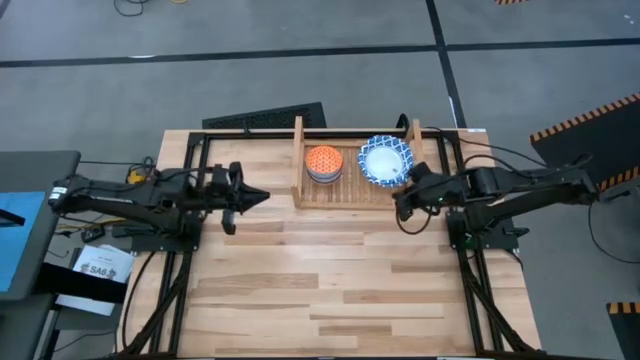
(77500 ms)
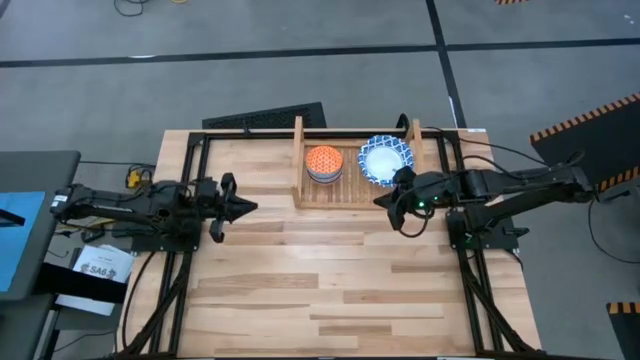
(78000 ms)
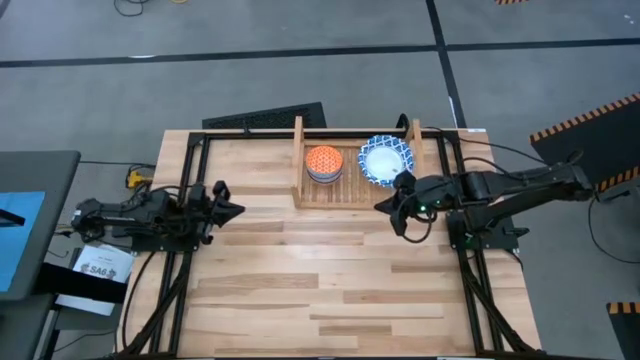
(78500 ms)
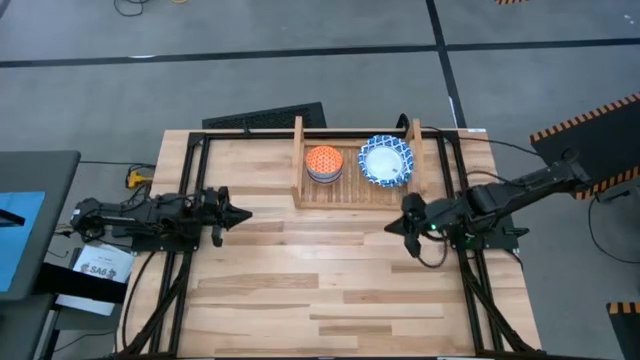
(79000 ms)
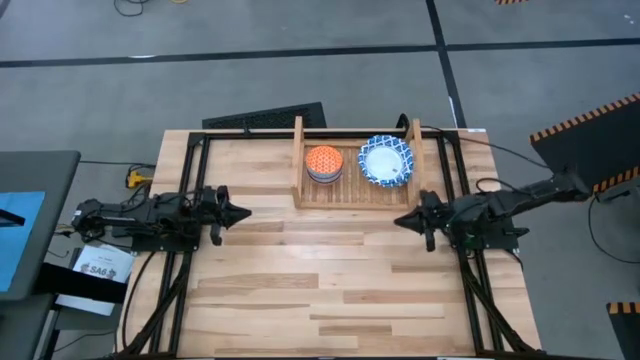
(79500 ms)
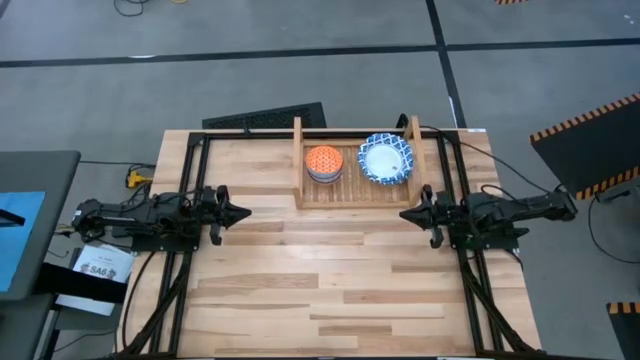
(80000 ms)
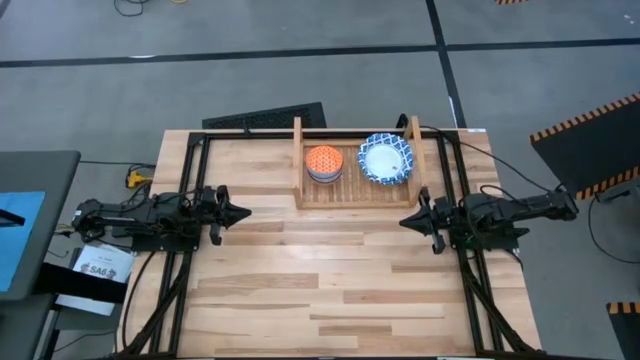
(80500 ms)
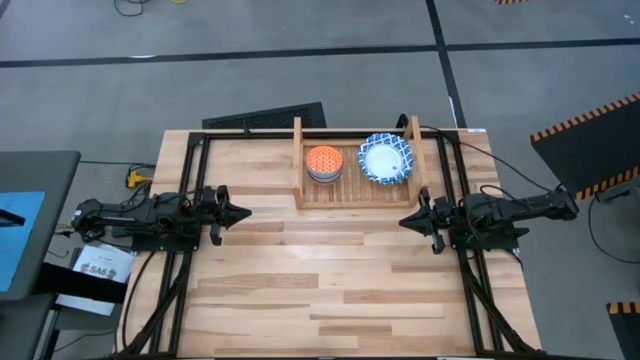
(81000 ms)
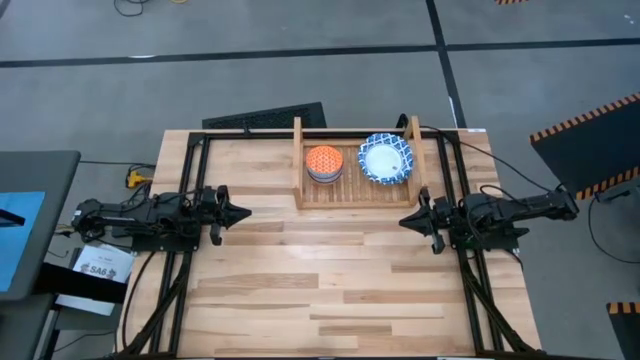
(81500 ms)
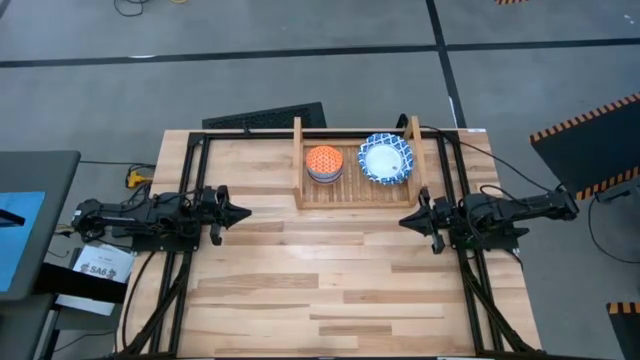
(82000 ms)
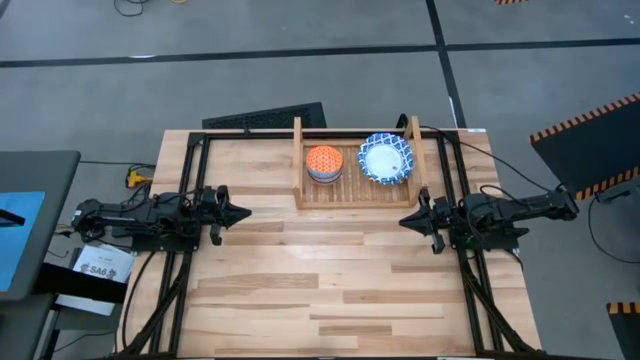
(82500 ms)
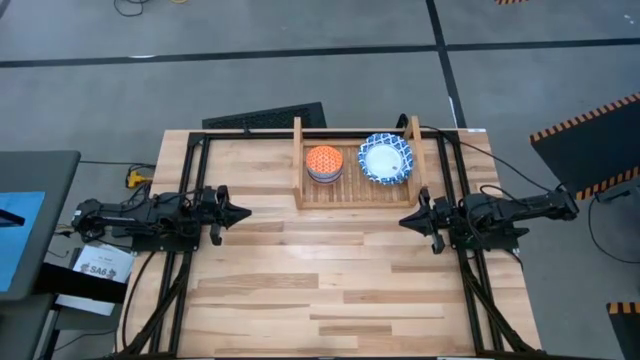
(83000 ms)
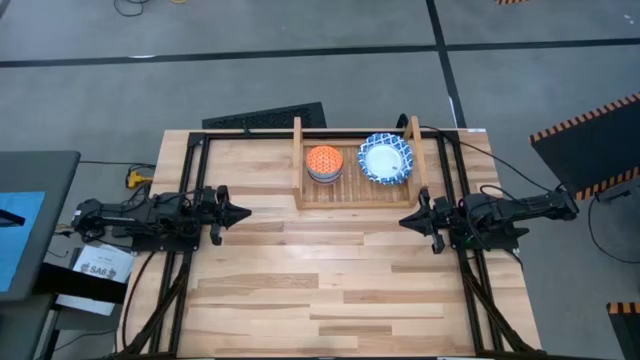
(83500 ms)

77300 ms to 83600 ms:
Task: Place and stack bowls onto a shelf
Return to Home Position

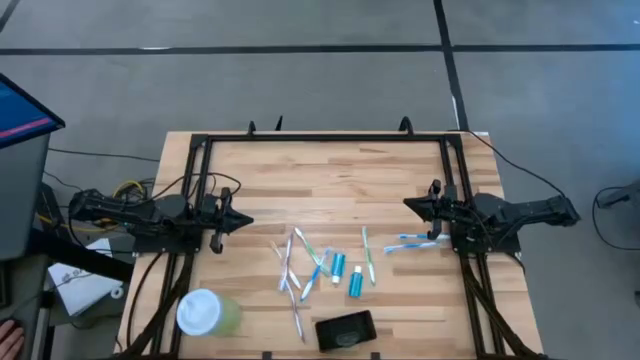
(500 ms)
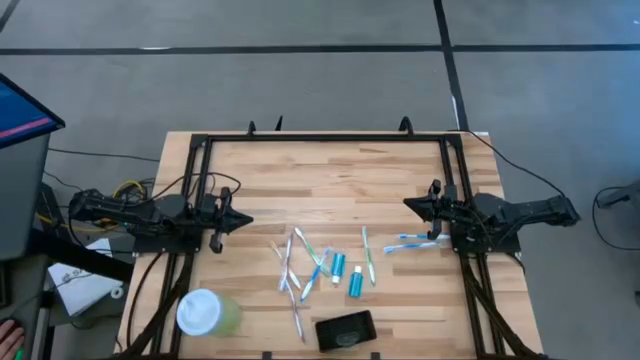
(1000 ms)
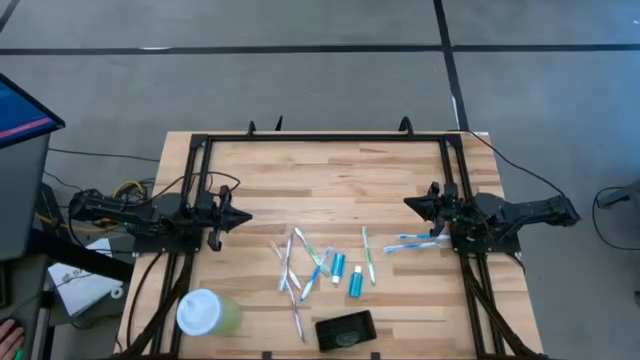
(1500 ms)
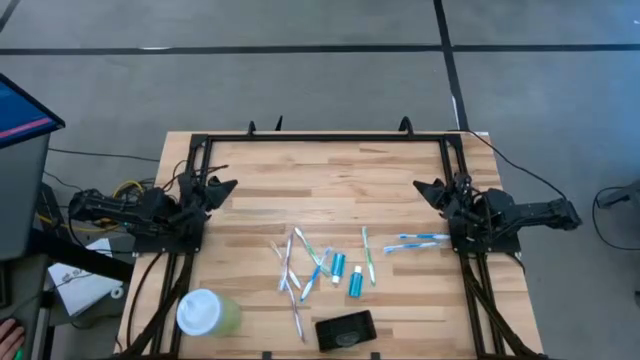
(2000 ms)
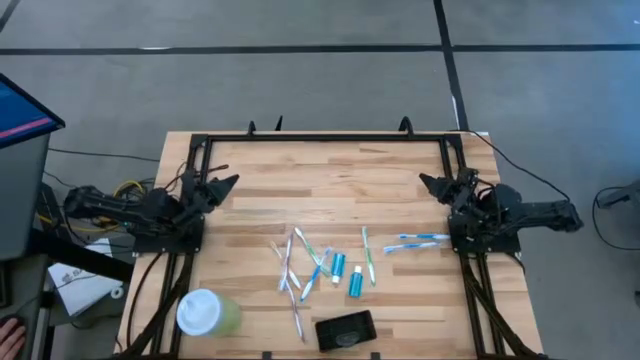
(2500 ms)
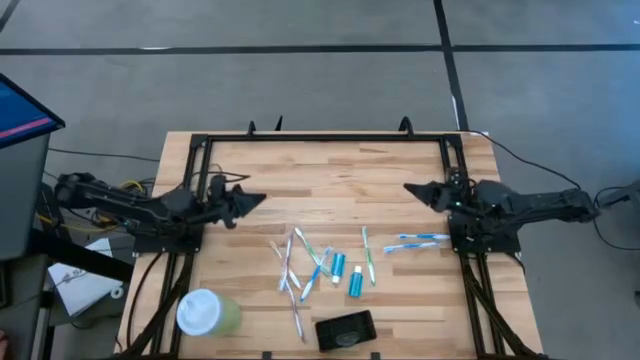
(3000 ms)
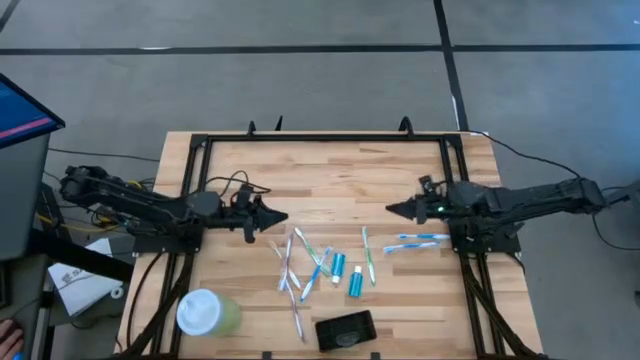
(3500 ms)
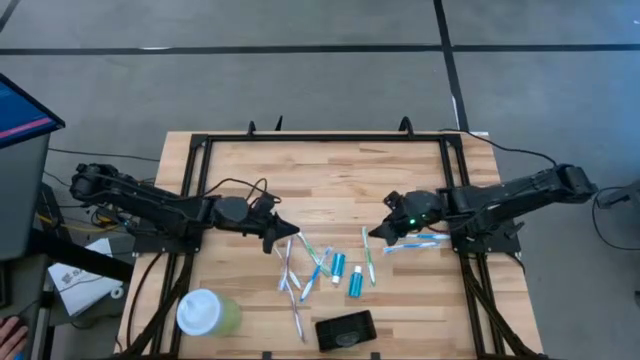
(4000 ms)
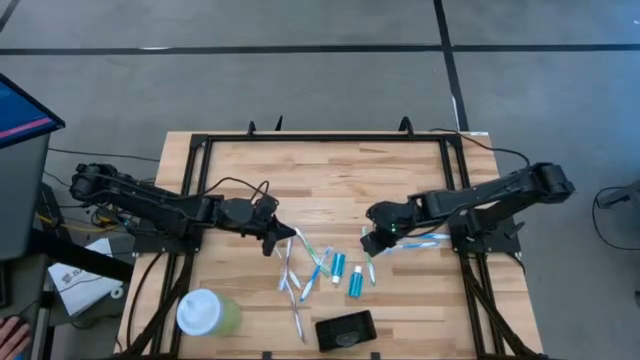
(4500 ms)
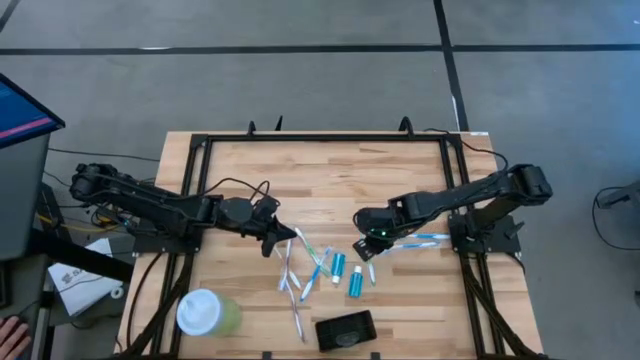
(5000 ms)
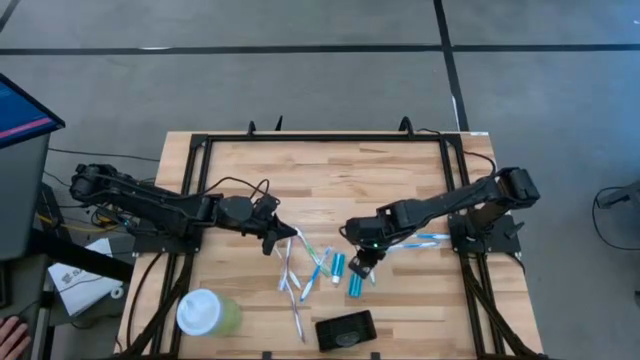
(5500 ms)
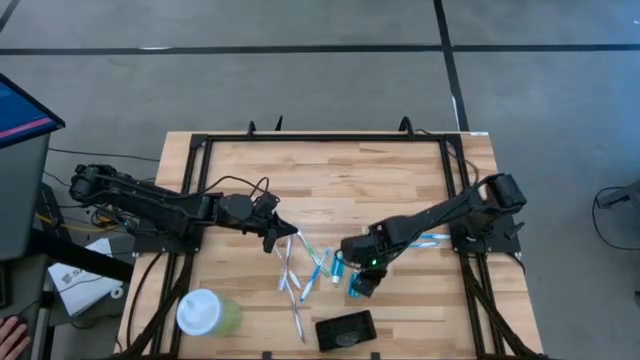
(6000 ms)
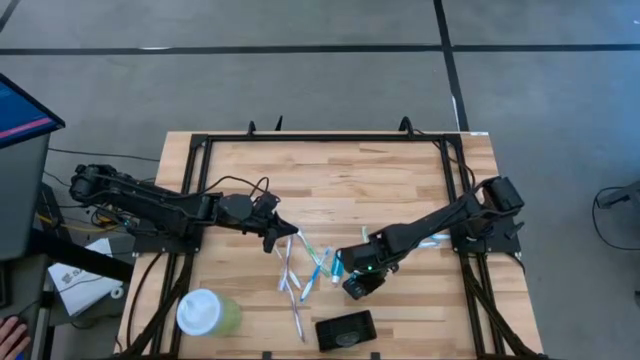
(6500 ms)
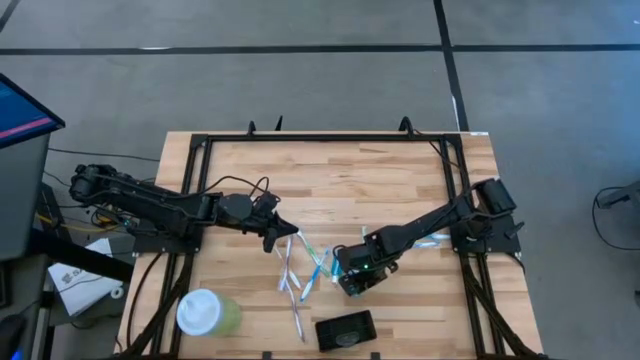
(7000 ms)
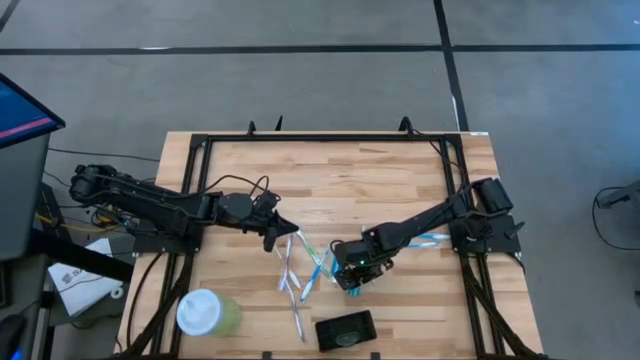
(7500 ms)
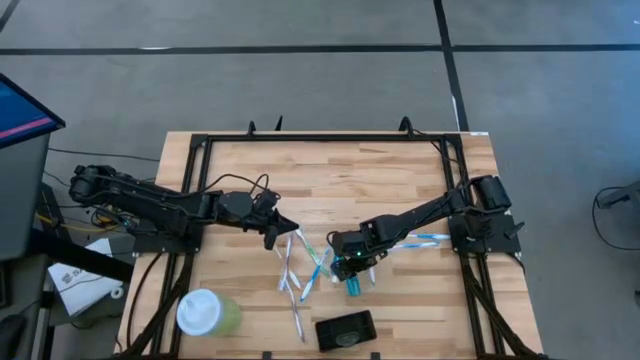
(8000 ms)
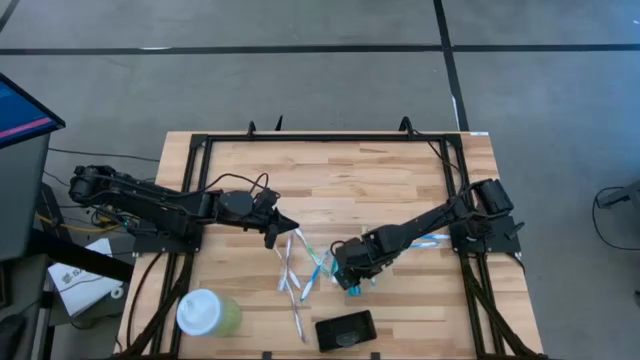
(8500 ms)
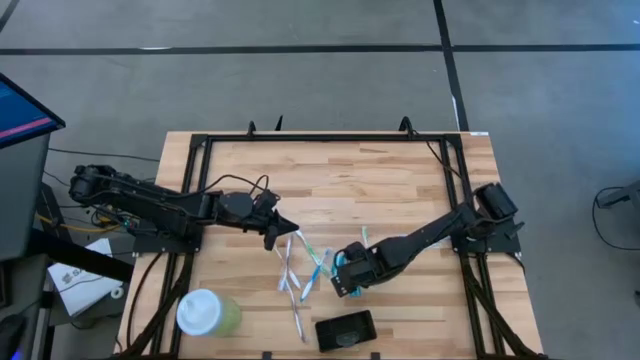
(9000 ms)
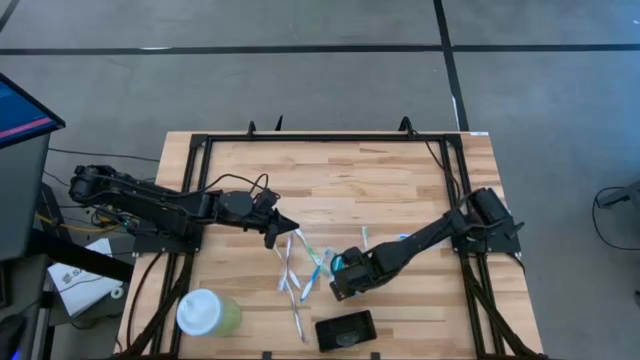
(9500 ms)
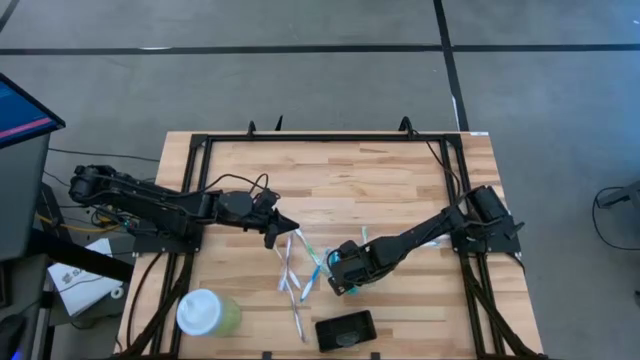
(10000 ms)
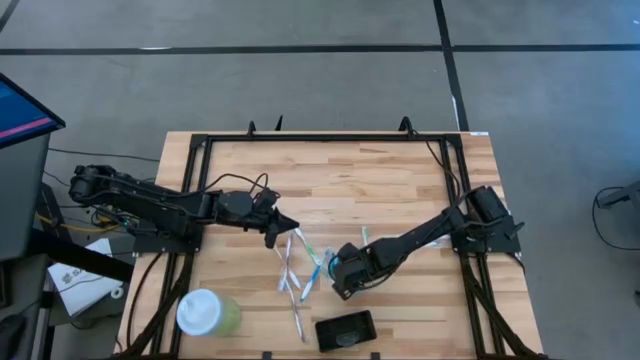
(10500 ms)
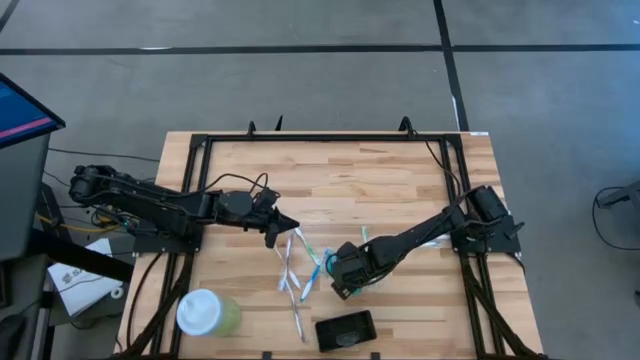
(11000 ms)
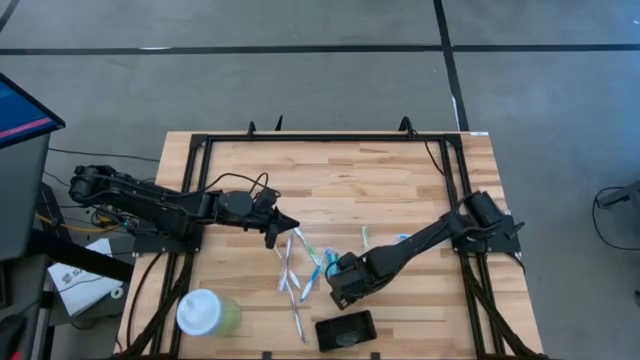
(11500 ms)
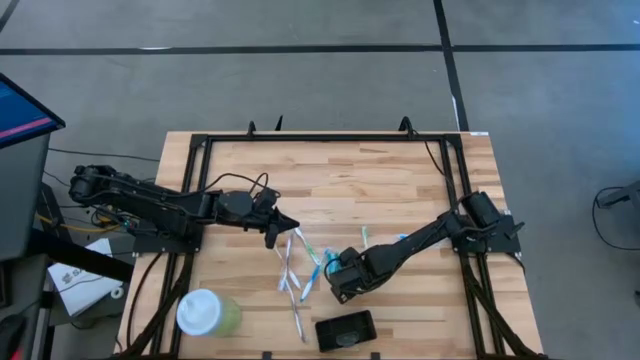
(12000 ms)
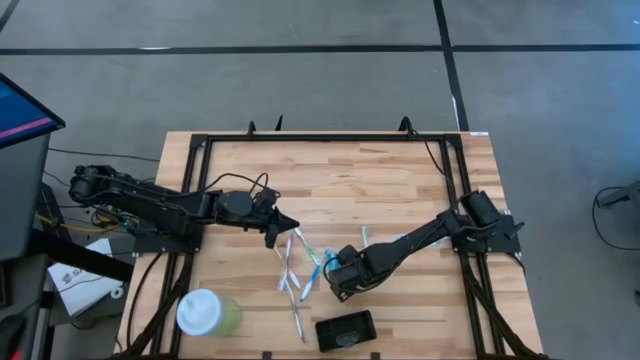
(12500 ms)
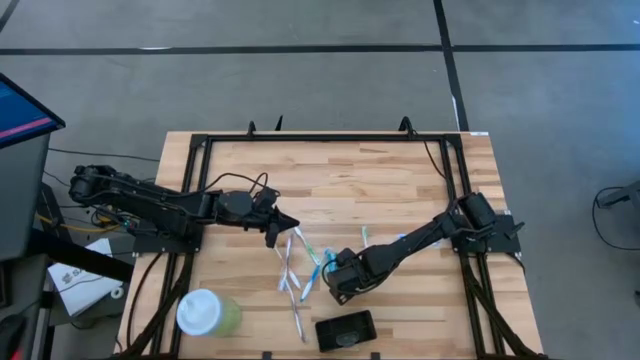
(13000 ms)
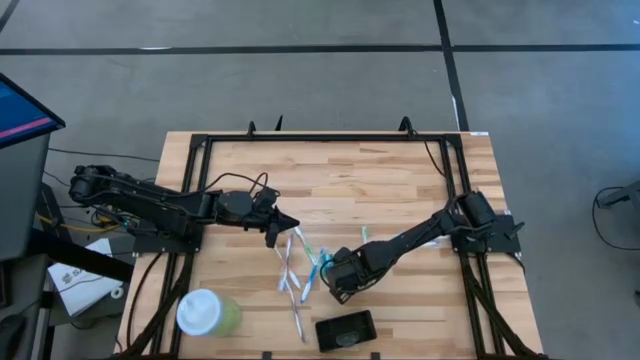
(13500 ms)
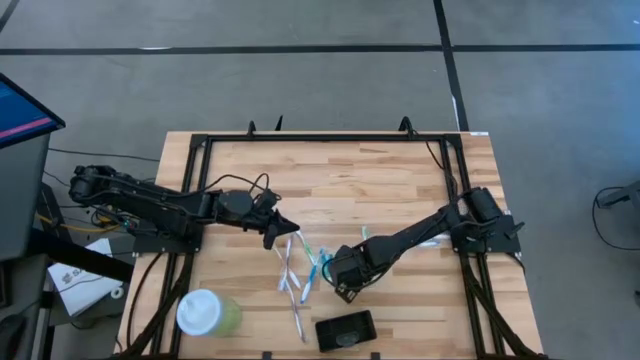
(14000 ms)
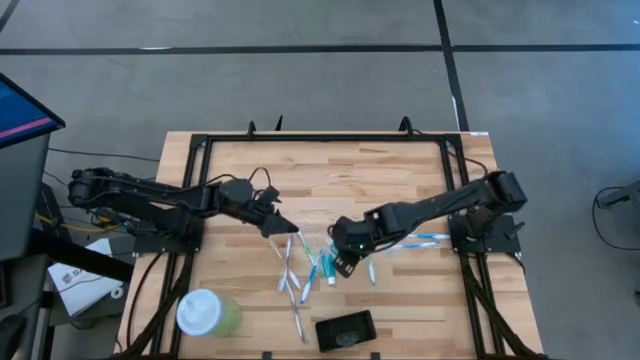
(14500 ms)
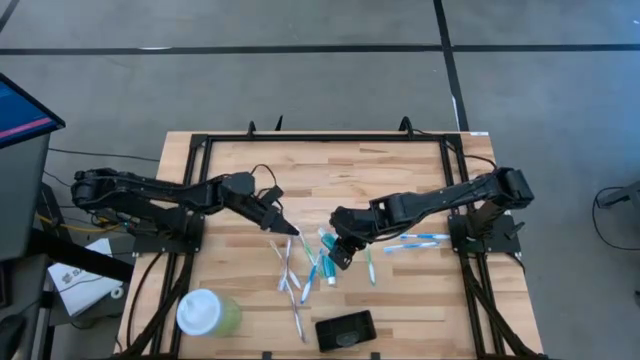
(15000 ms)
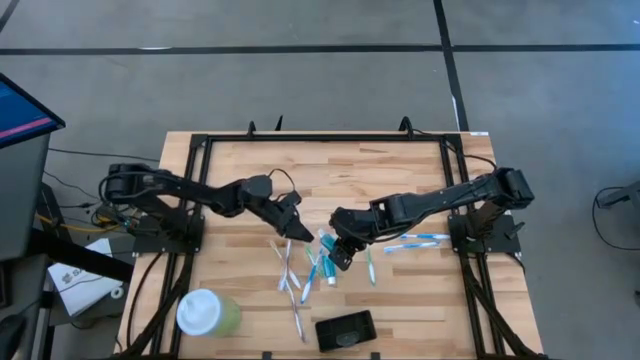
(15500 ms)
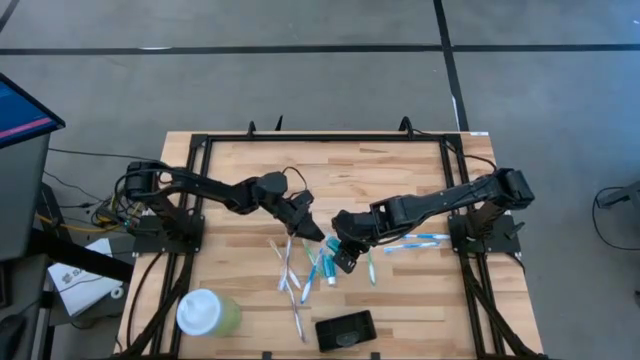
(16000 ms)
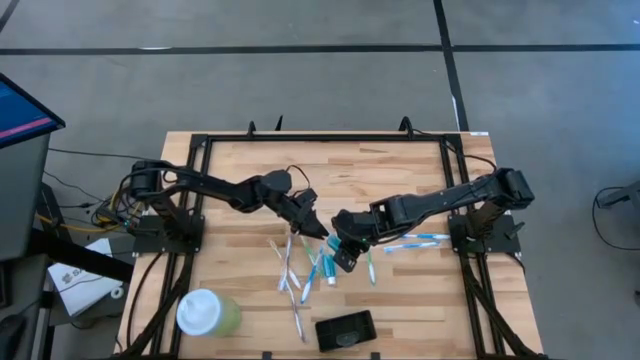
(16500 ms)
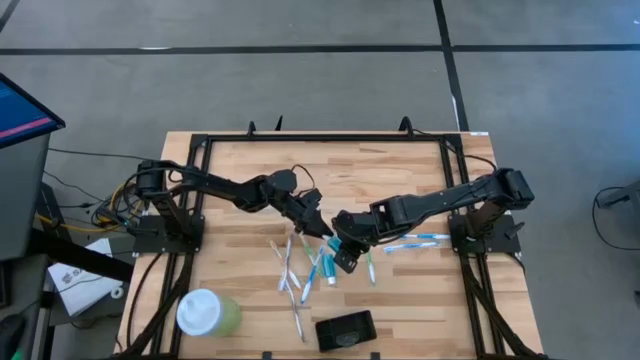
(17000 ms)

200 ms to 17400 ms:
Task: Pick & Place toothbrushing station
Put the right blue mouthwash into the black wire organizer
